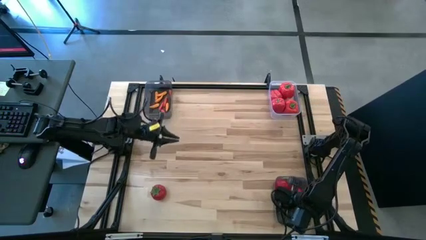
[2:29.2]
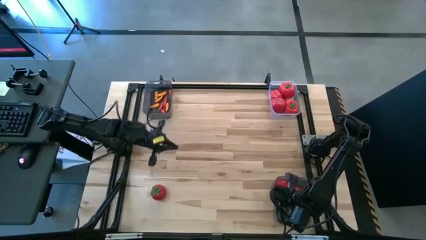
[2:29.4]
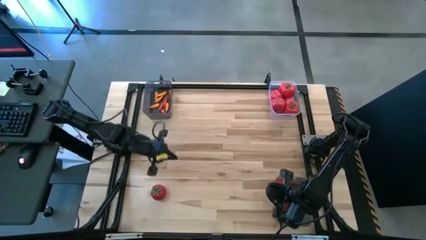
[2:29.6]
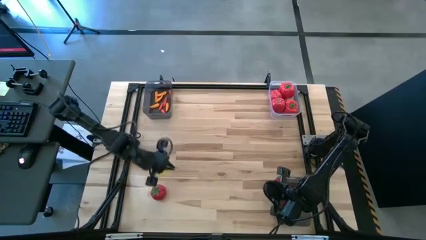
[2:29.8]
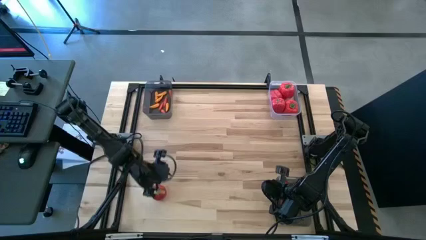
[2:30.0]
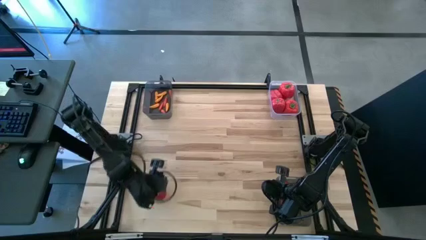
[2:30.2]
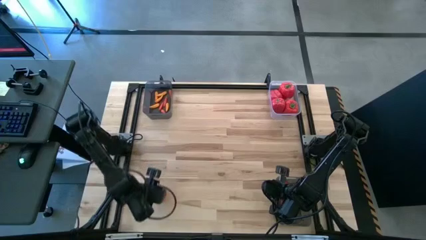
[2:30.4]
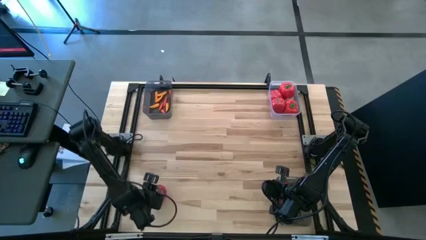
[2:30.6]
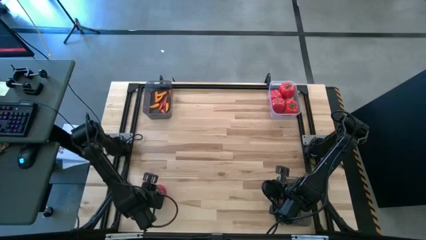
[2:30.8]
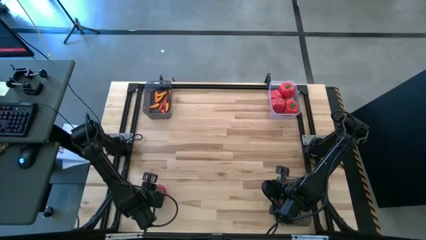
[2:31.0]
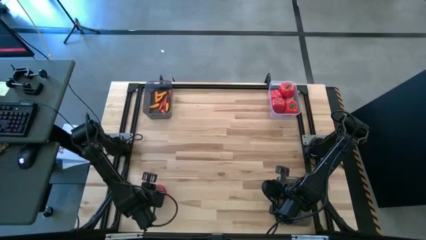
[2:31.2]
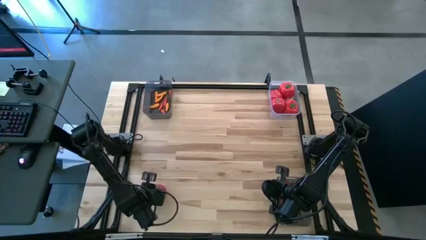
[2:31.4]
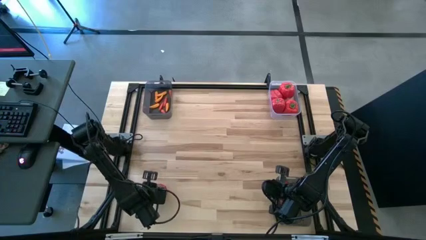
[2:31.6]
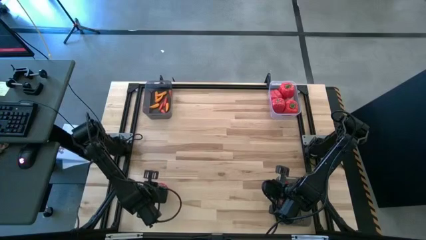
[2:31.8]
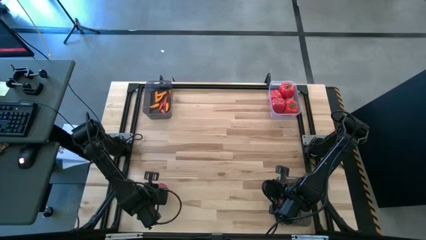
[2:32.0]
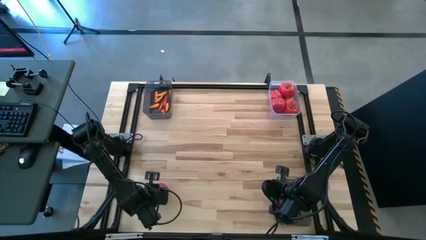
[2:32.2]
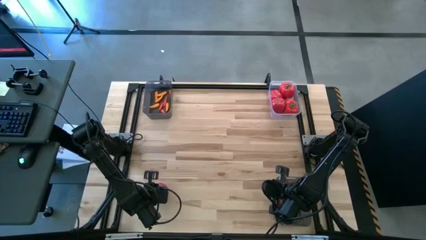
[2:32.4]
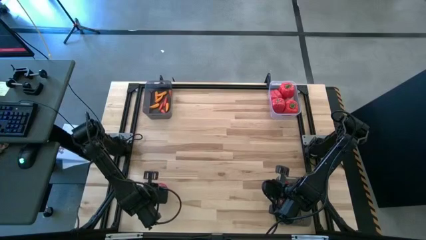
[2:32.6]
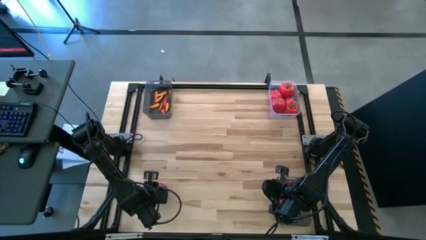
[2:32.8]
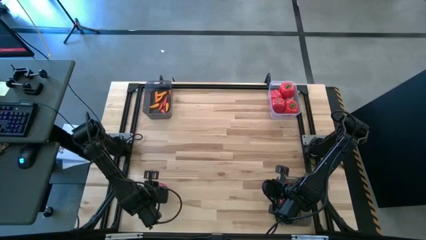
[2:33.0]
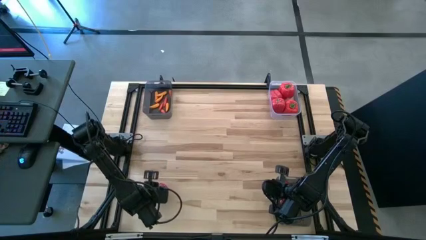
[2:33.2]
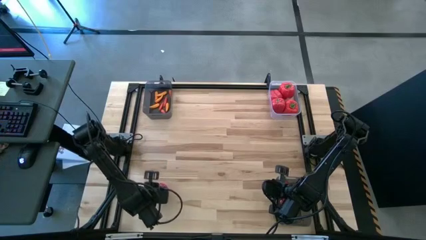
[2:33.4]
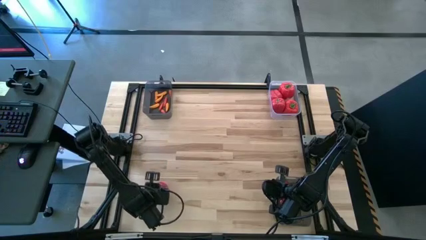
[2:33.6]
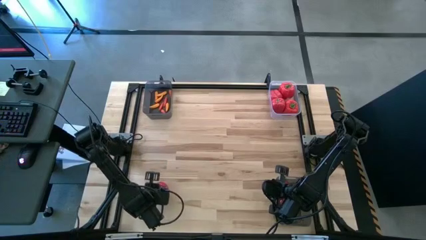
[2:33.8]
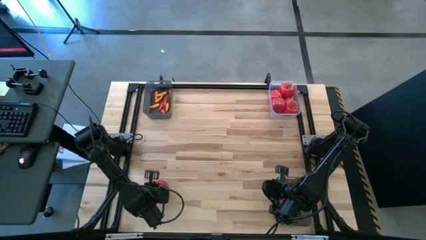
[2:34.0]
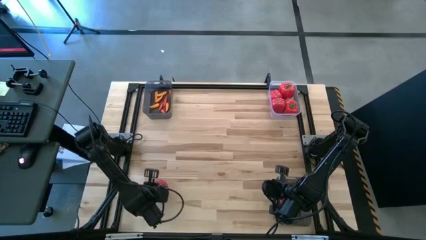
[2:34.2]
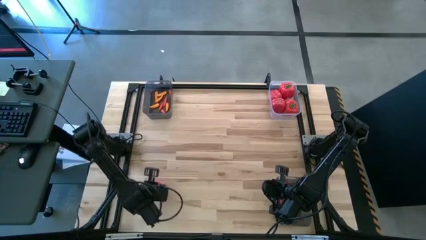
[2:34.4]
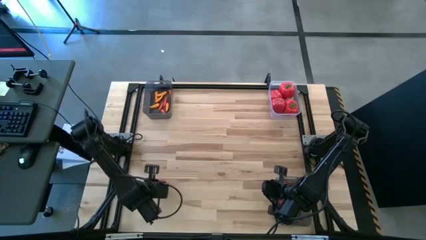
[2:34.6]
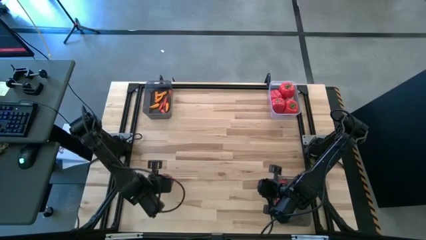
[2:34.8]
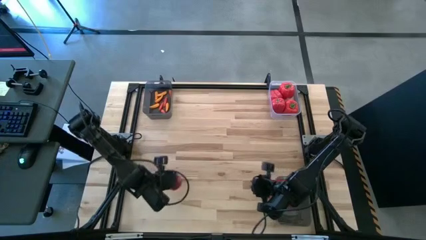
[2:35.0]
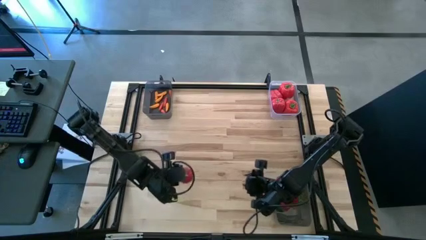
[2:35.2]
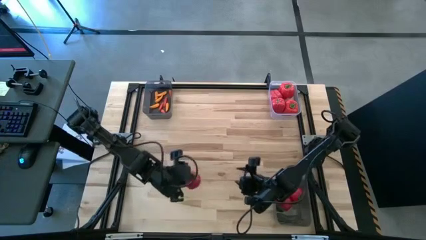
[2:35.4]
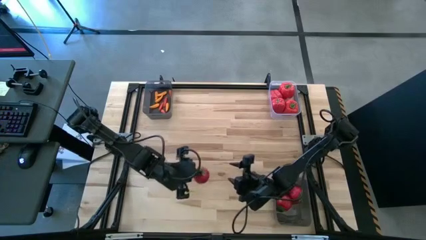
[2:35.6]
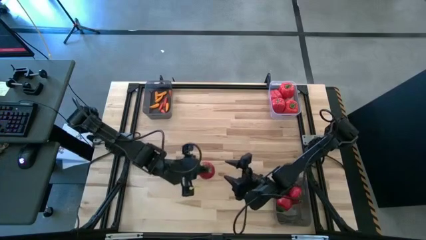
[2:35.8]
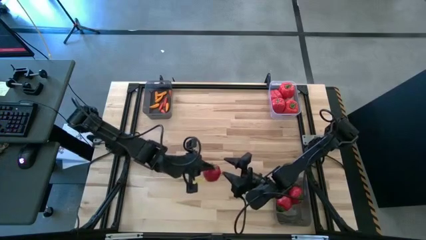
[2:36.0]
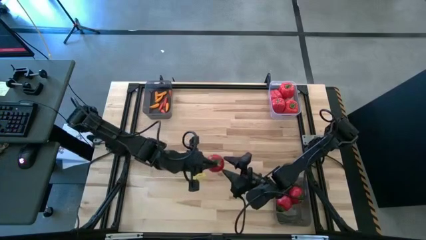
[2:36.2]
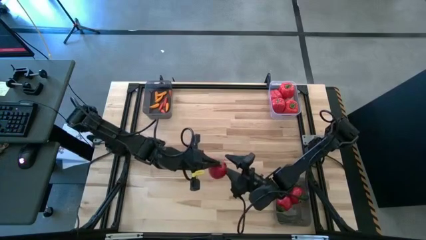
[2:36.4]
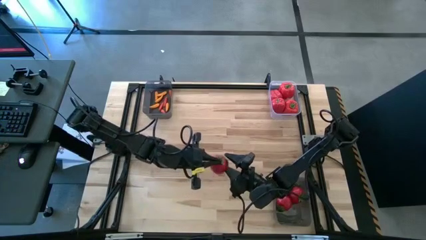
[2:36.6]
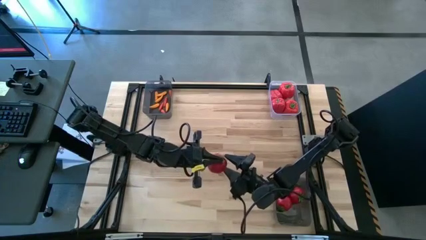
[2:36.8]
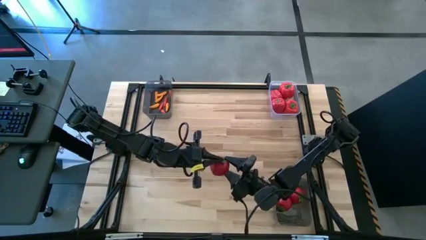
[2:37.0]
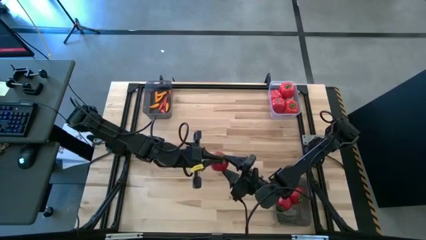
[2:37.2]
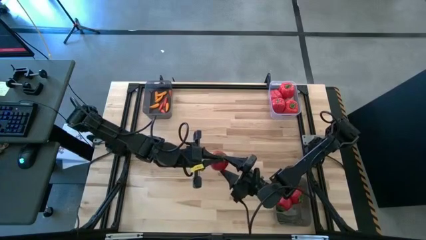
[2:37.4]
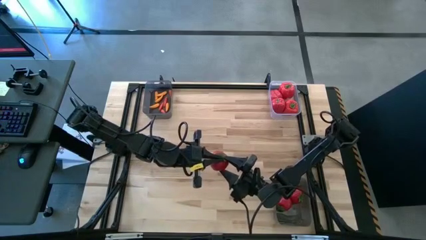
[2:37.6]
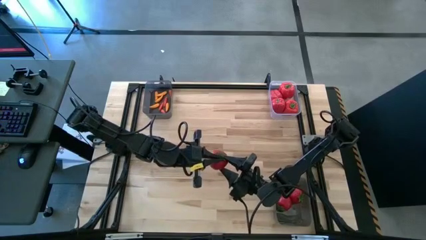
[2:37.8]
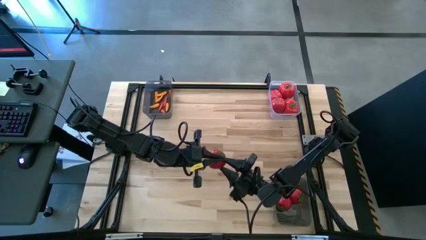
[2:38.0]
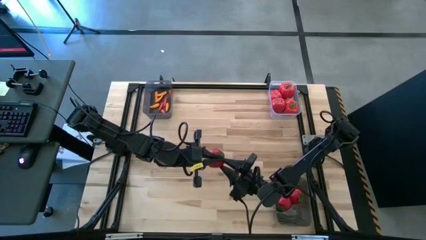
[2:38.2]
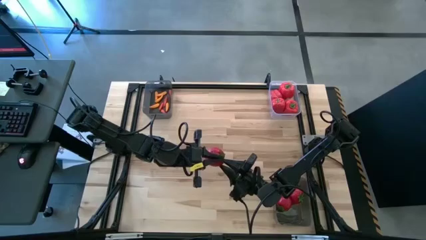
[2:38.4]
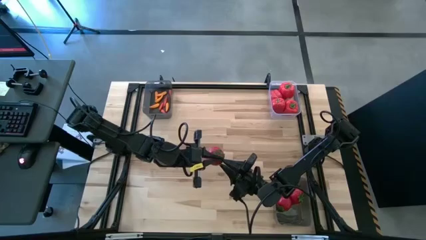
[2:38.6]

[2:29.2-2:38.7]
Task: Sort produce into baskets
Put the tomato into the bottom black bin

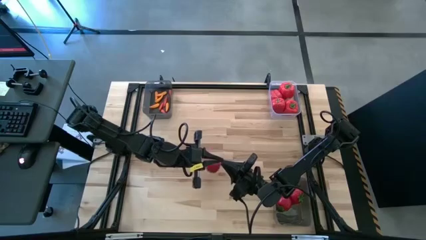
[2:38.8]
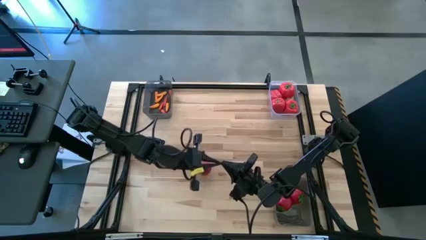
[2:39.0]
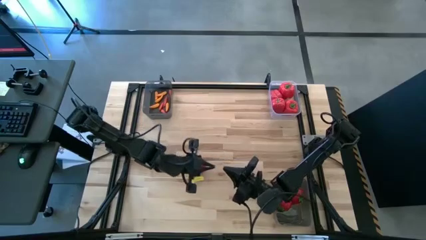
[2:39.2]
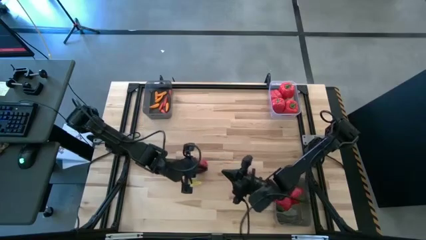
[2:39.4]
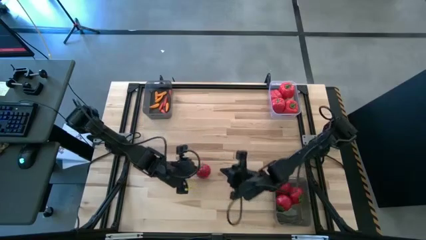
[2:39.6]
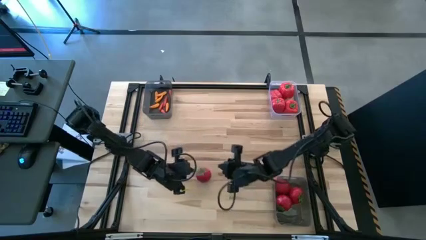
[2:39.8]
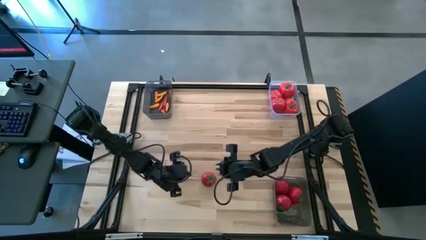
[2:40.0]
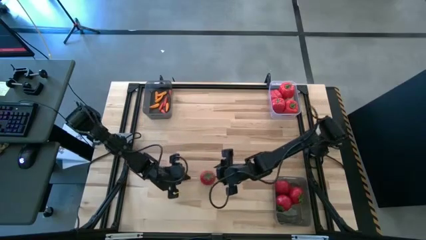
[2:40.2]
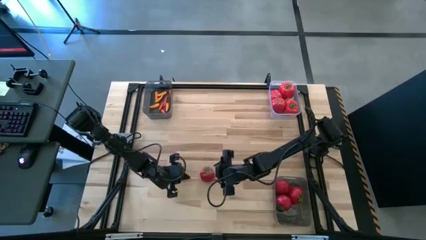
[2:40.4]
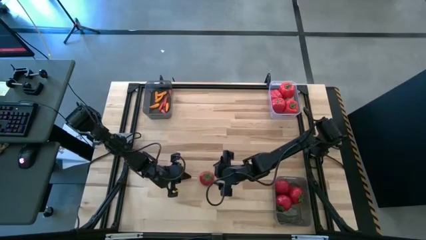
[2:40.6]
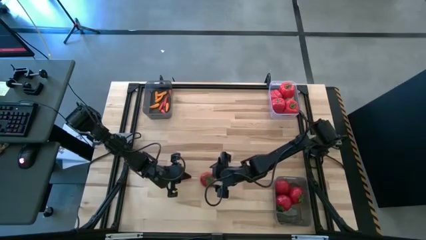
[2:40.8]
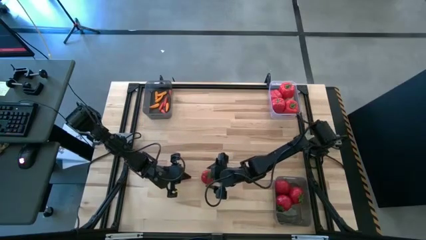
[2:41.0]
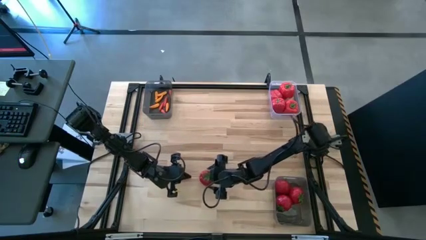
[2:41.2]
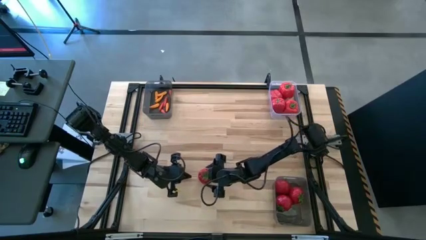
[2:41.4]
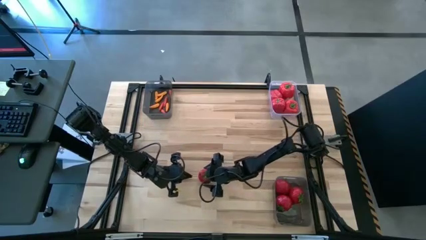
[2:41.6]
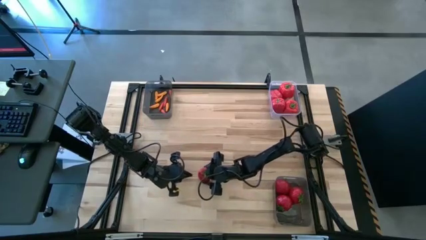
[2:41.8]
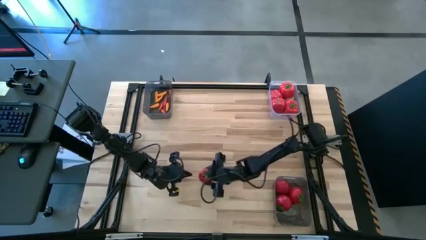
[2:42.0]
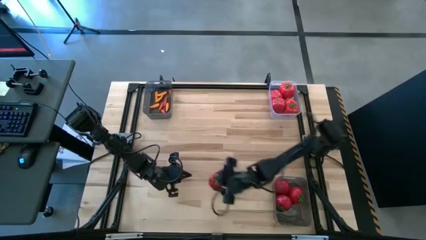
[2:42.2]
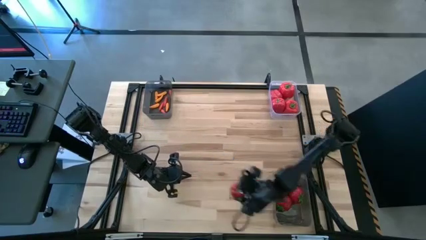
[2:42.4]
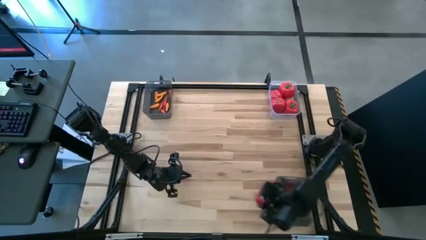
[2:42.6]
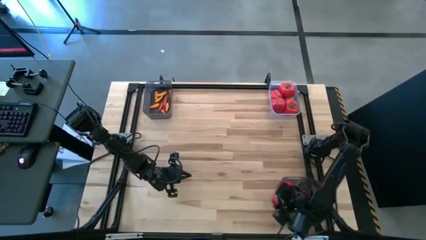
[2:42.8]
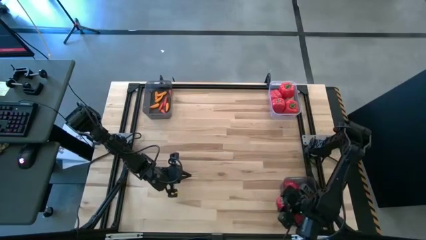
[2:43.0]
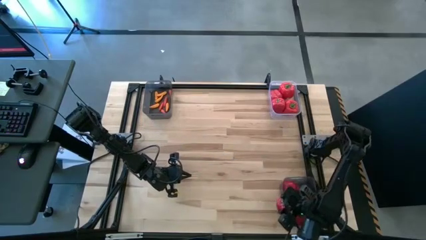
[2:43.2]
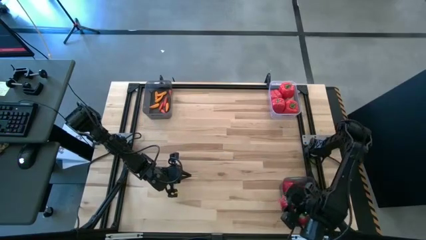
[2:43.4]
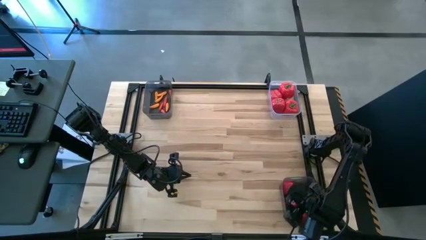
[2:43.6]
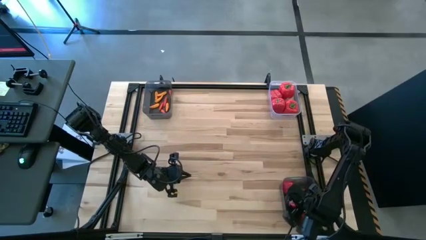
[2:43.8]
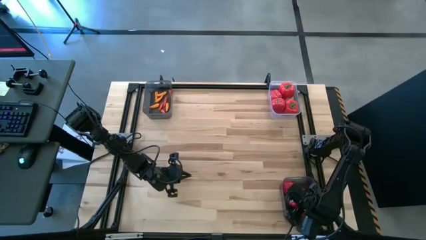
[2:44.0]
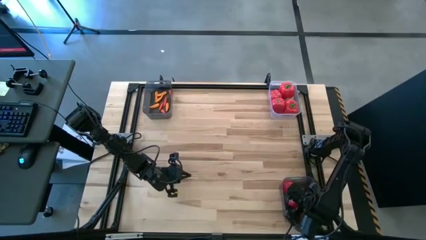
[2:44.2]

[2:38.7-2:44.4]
Put the tomato into the bottom black bin
